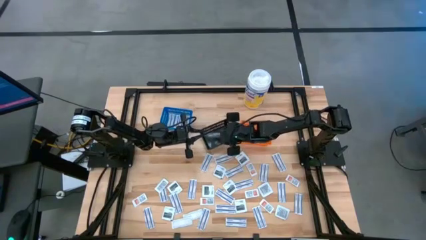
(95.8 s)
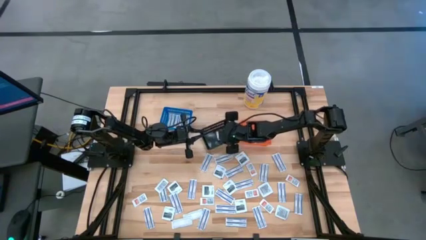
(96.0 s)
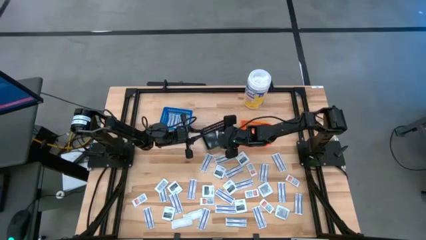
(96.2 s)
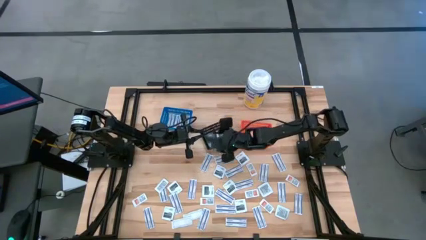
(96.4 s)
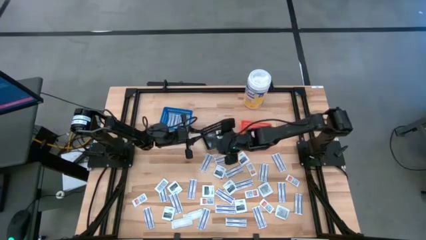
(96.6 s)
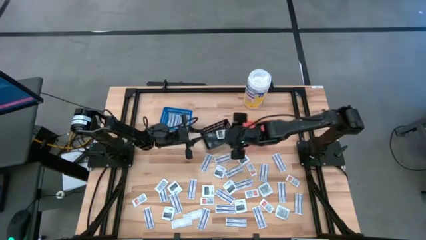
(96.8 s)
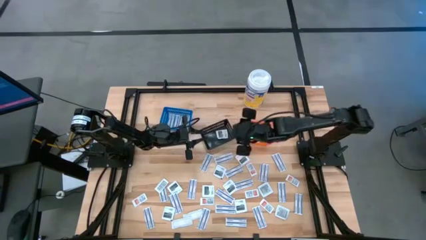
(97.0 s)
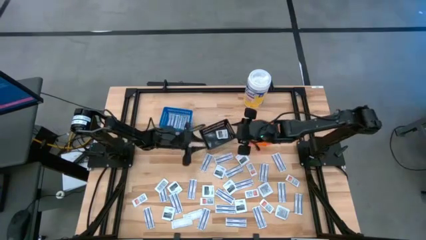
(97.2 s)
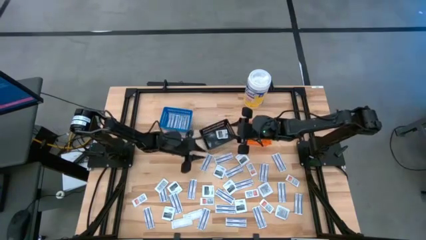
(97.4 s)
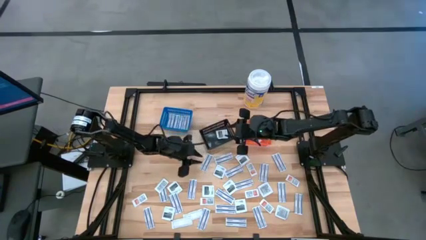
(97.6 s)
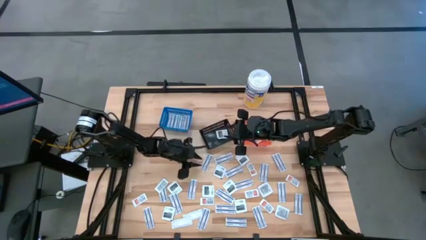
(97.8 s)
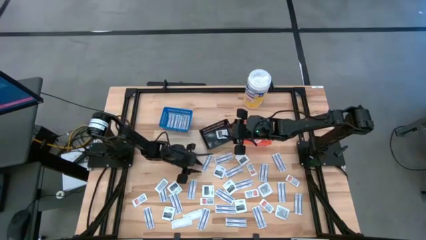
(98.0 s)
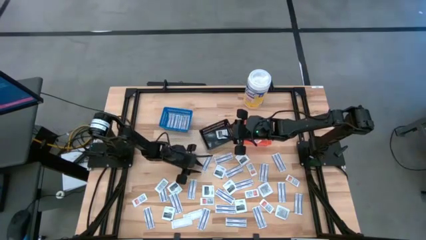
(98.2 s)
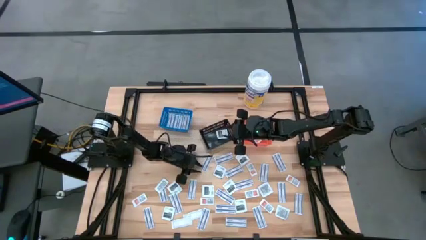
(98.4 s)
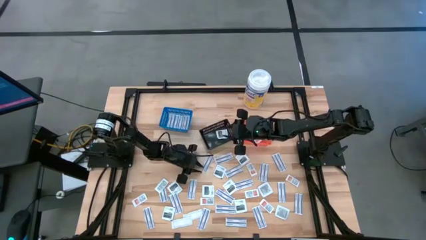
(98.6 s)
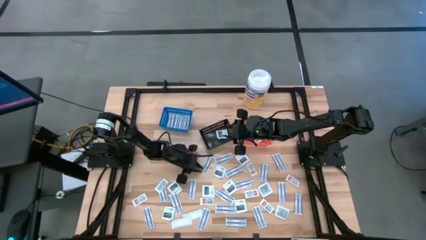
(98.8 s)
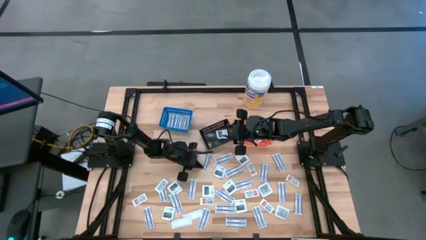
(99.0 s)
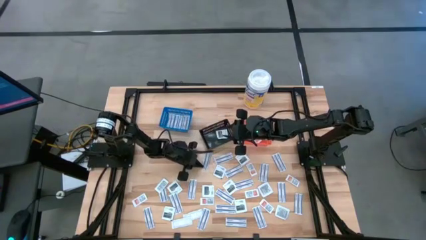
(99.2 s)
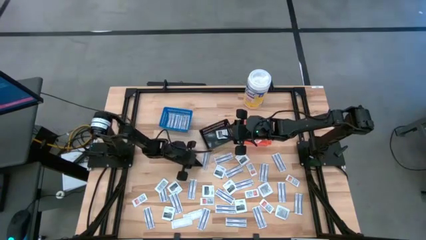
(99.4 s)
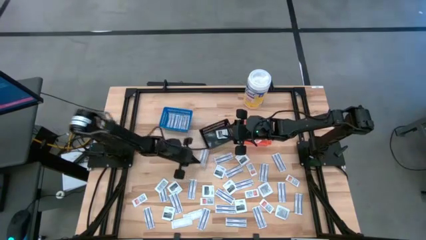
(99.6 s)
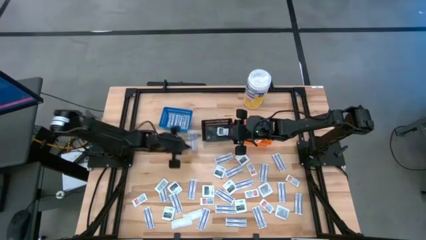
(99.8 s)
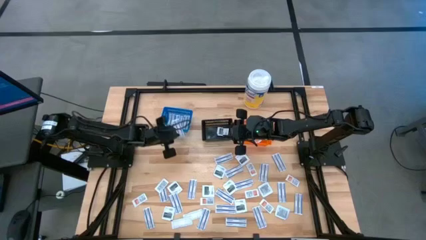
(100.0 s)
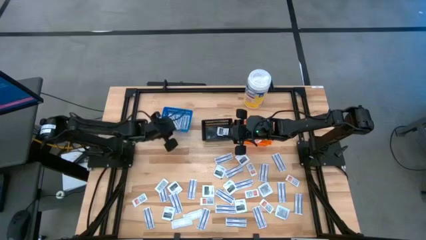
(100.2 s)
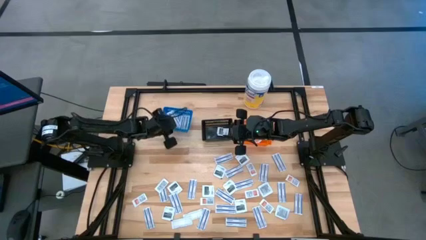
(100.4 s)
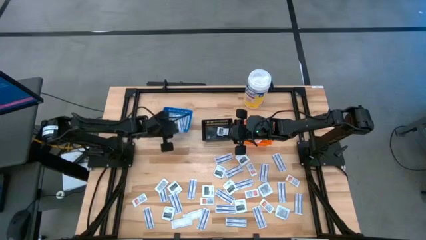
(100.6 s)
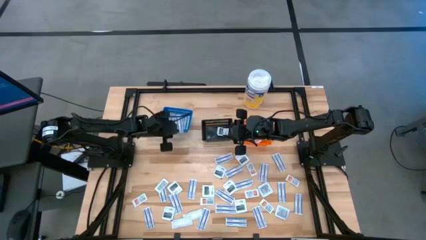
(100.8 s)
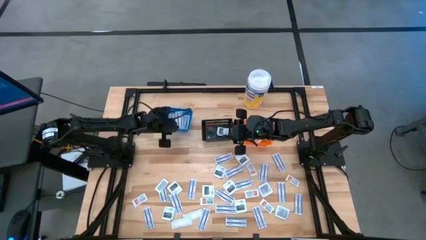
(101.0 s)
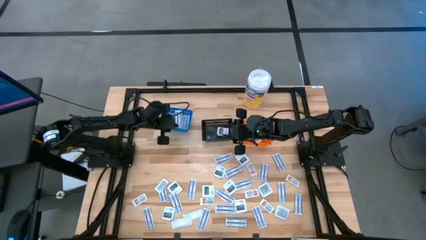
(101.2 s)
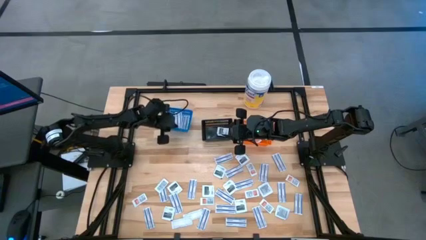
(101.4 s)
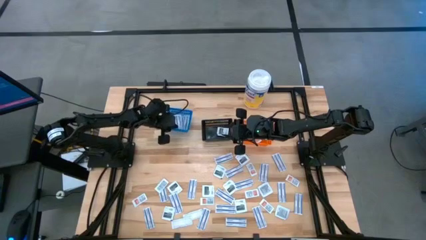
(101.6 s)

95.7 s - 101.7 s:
Task: Pick & Place First Aid Supplies
Put the bandage into the blue container

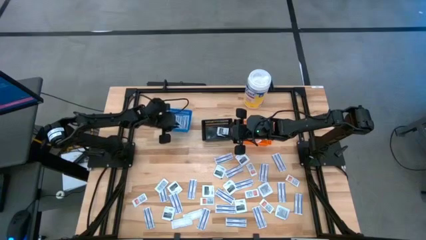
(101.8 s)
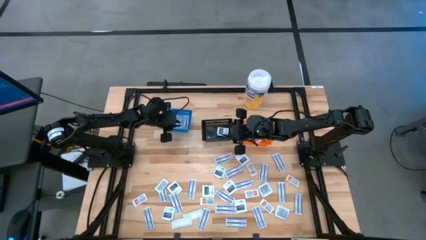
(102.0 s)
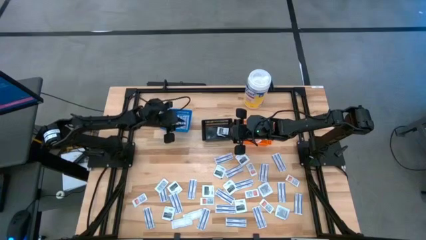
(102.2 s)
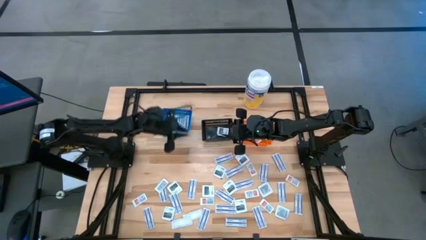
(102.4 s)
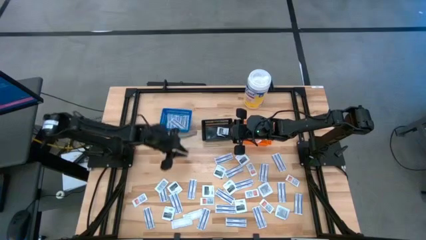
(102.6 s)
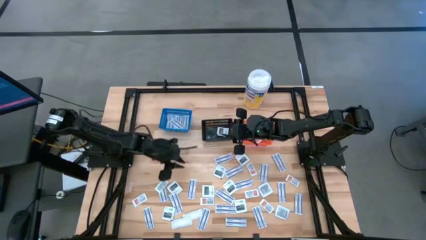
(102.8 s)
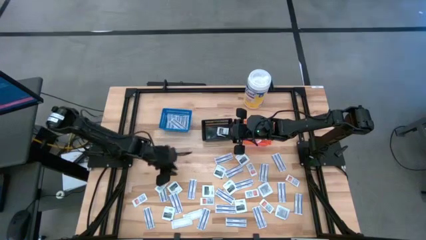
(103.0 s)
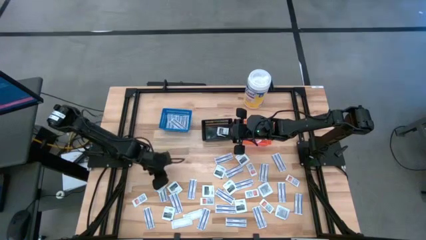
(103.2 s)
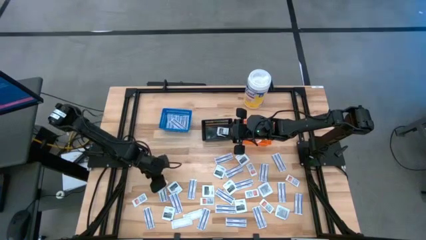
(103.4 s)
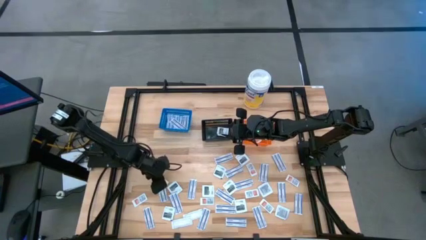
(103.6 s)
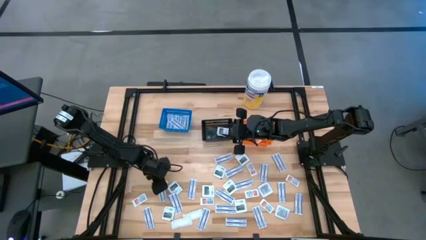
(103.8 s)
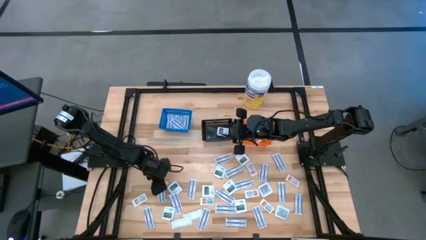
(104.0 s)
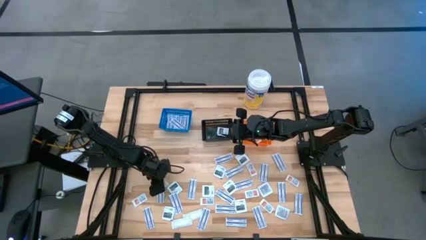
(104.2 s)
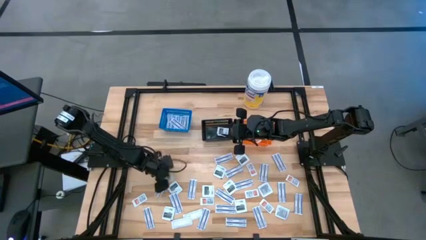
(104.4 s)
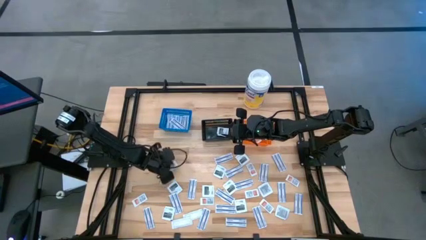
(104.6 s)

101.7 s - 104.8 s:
Put the ointment pack into the orange bin

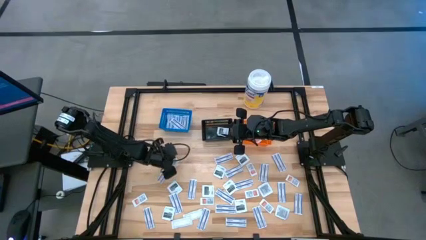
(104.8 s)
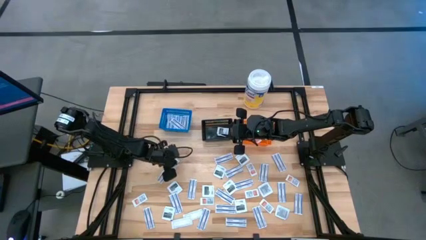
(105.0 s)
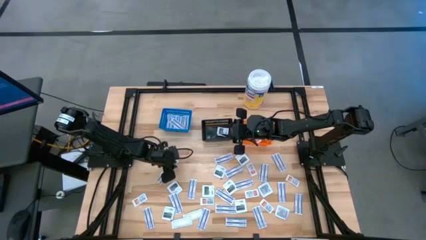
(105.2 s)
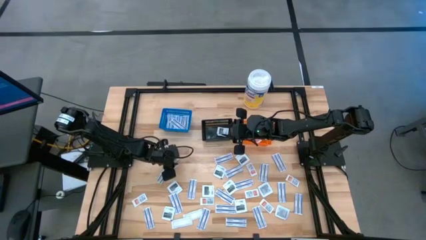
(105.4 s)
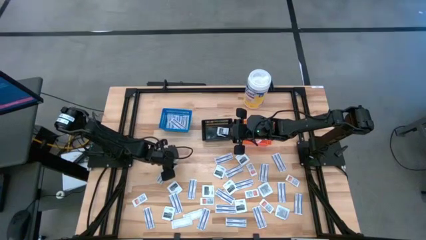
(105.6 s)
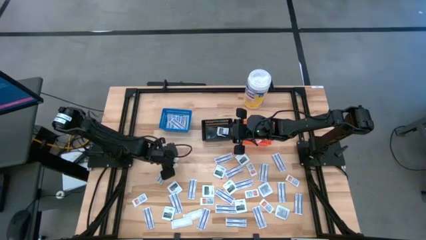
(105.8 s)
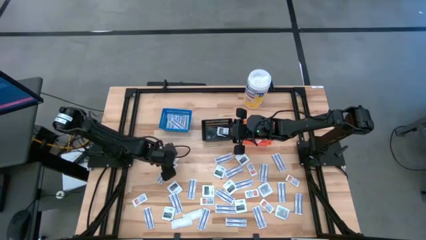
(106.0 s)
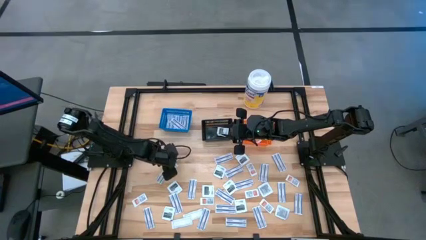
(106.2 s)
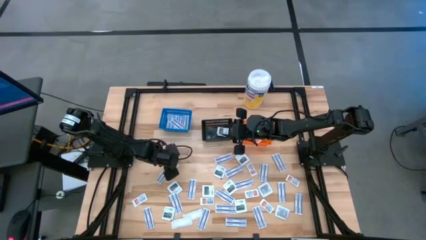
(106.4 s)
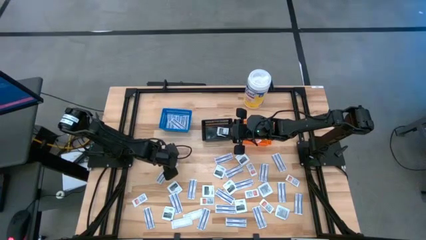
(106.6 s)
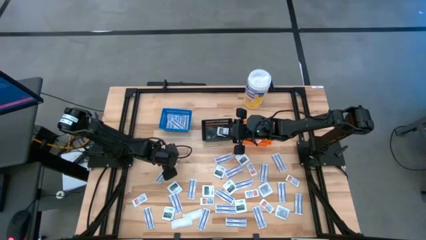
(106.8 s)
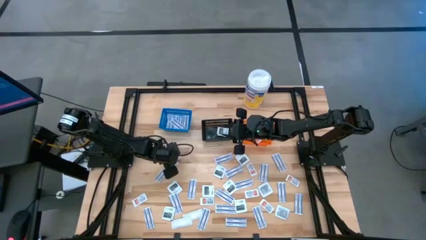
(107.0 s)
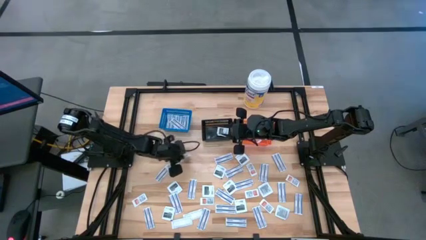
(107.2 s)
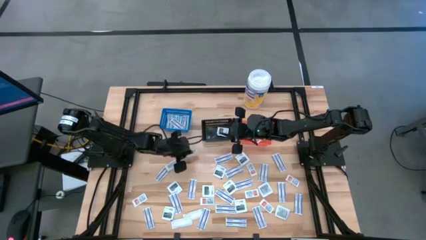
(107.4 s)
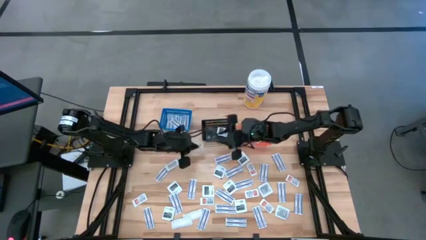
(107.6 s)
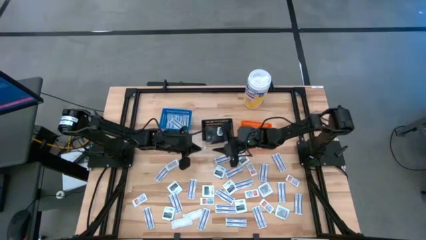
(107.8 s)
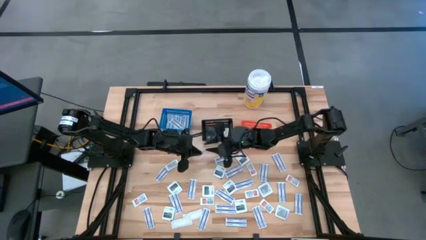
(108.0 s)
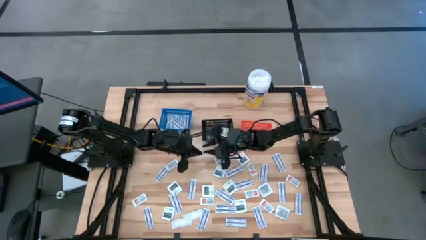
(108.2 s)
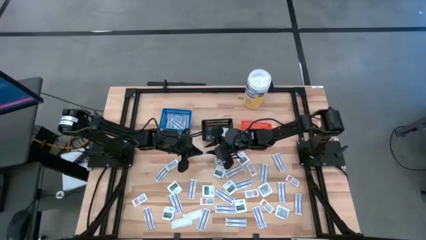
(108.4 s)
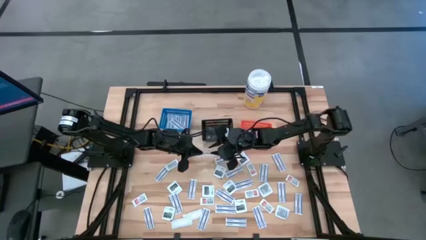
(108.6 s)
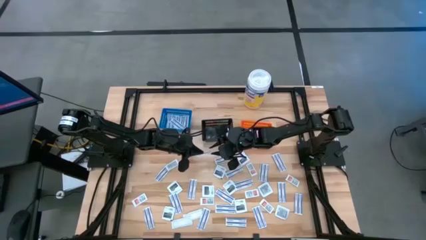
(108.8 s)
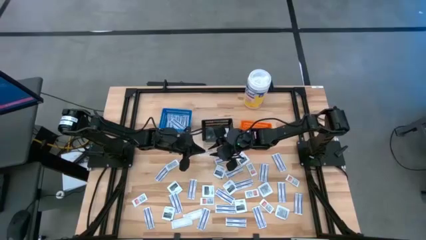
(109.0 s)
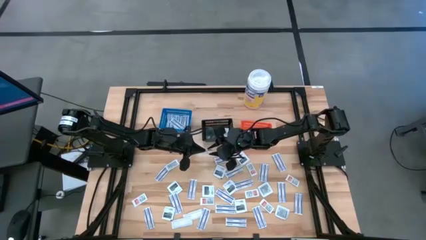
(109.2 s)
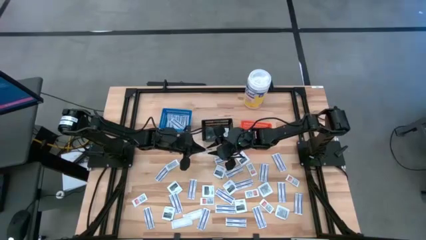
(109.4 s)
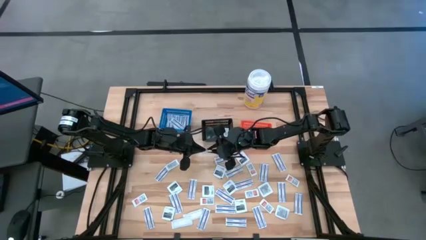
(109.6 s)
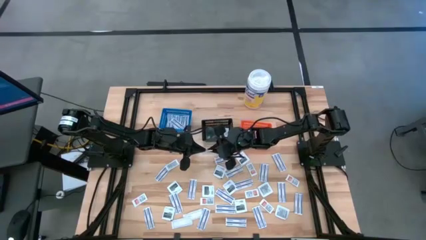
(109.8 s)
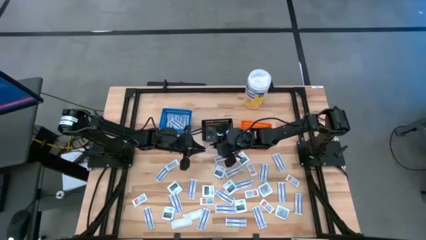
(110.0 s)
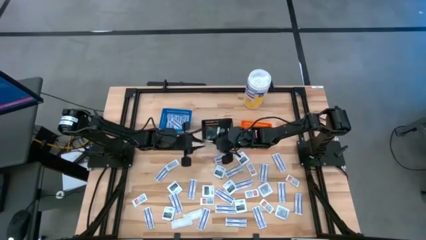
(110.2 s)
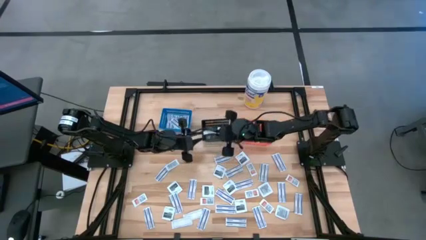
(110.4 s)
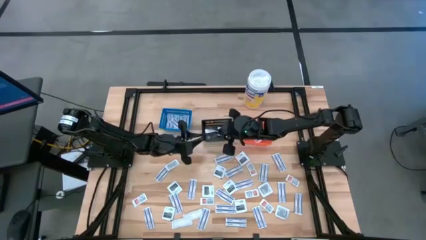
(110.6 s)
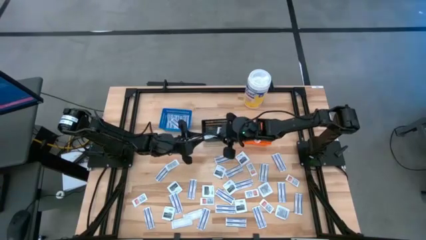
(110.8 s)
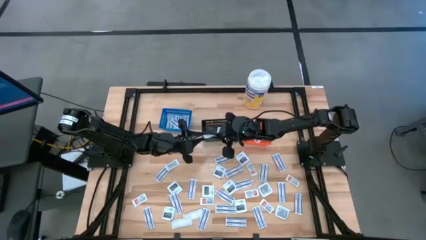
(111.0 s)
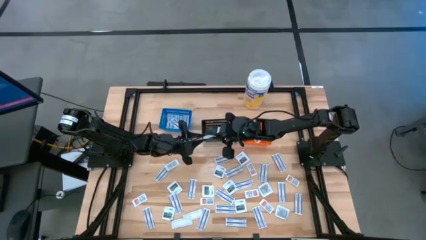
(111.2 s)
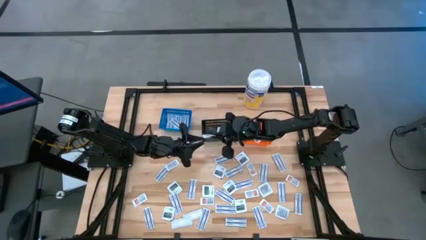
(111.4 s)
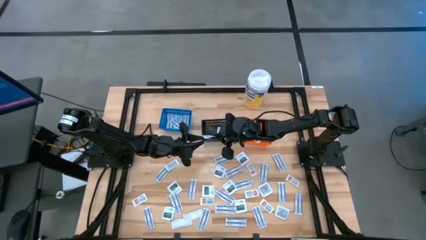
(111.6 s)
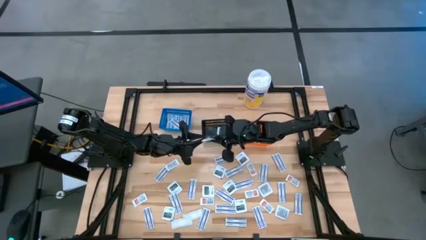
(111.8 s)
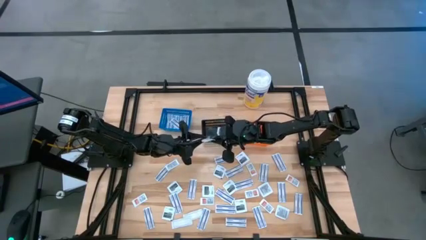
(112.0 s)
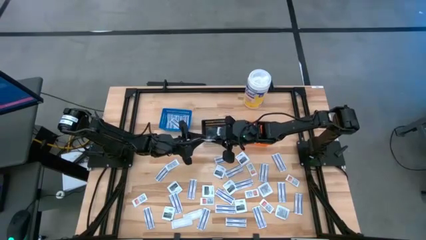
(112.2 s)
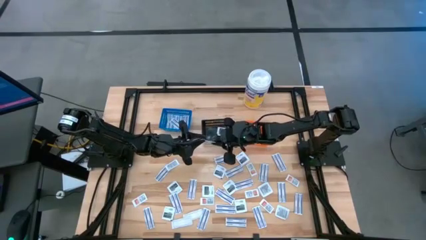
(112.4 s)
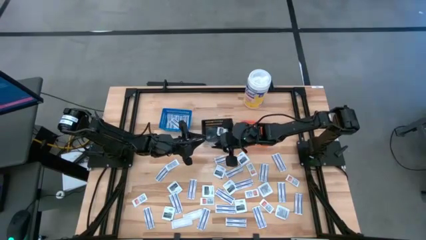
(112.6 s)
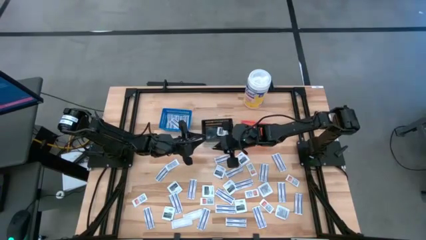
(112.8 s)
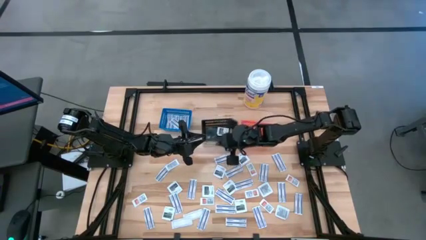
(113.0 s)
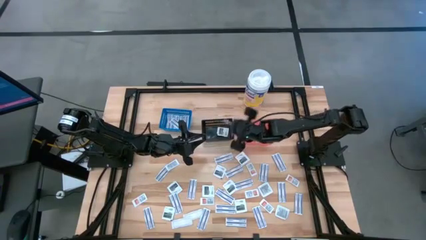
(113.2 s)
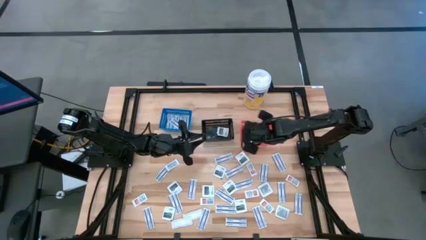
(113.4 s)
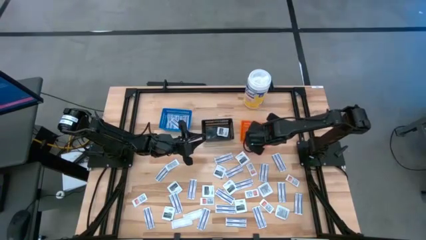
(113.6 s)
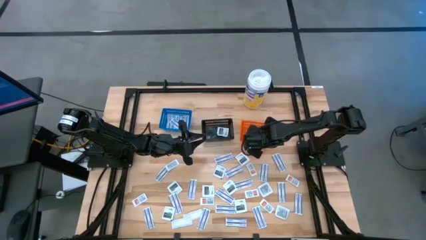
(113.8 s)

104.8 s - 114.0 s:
Put the ointment pack into the orange bin
